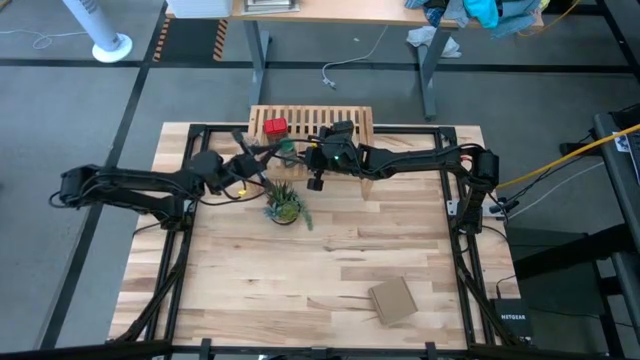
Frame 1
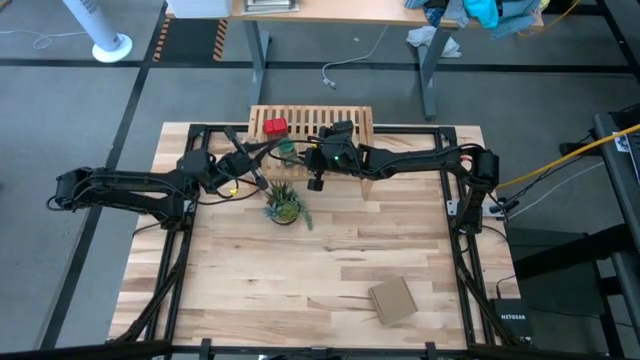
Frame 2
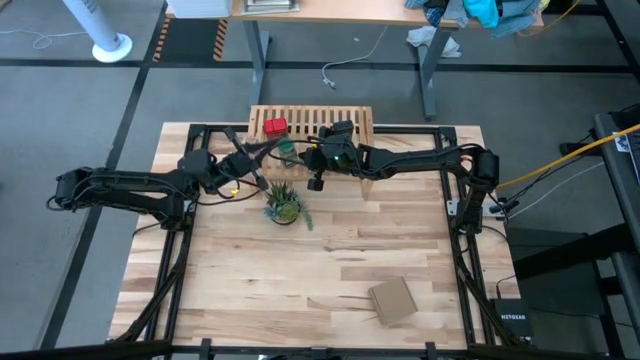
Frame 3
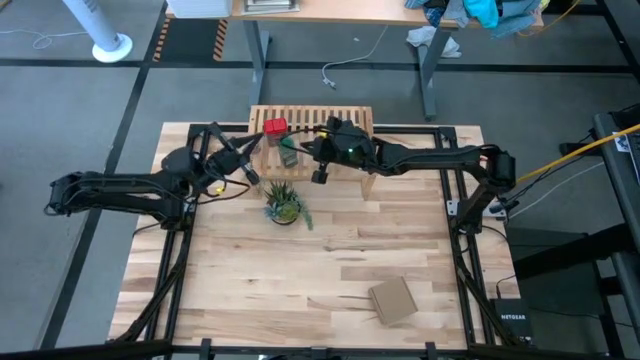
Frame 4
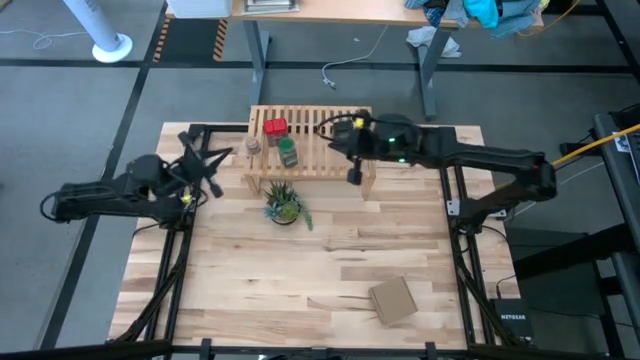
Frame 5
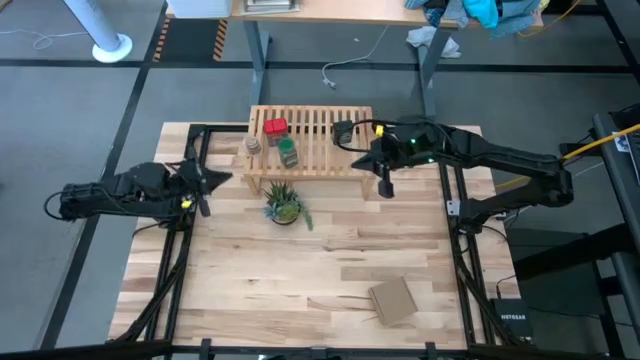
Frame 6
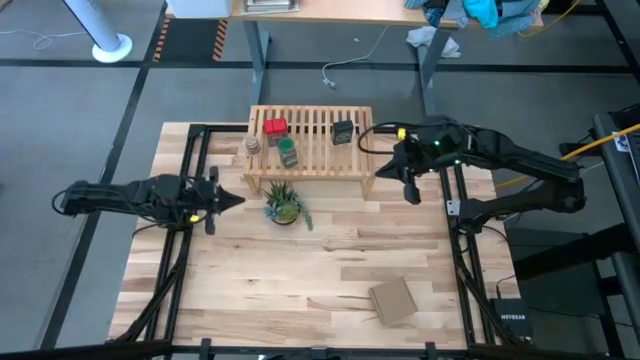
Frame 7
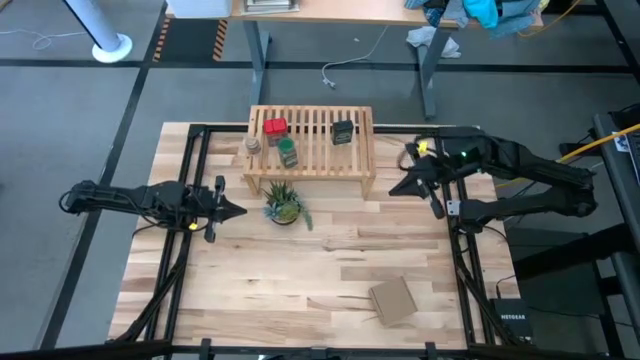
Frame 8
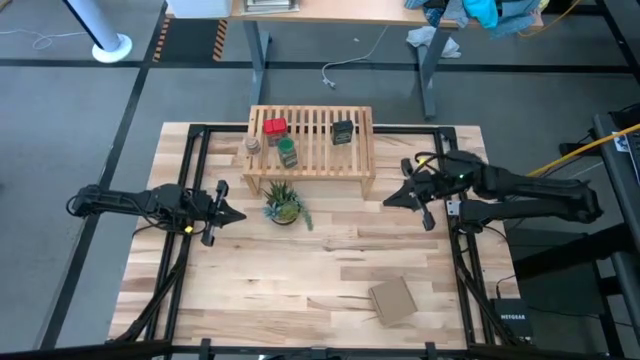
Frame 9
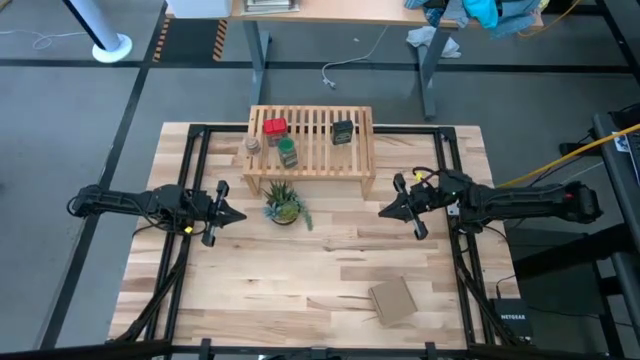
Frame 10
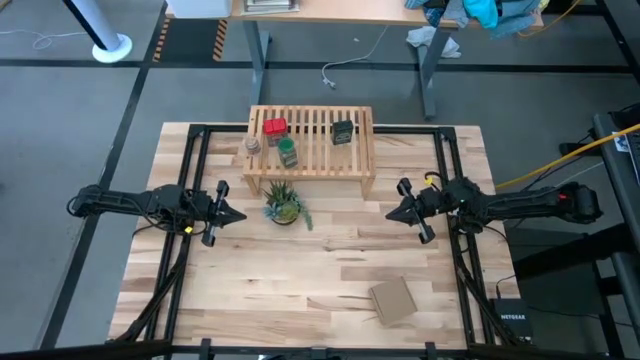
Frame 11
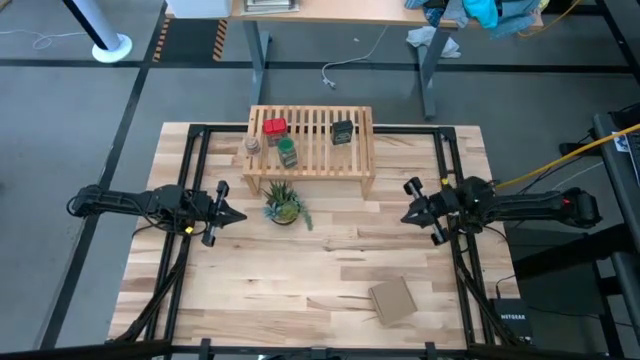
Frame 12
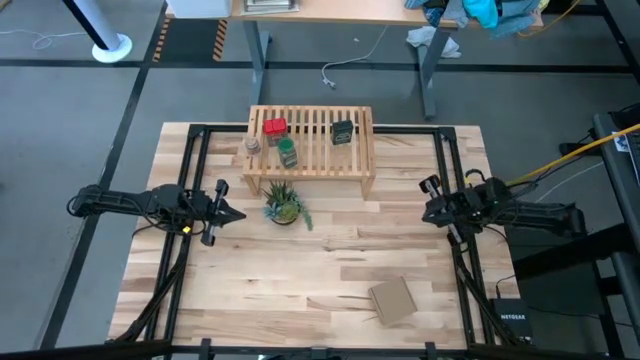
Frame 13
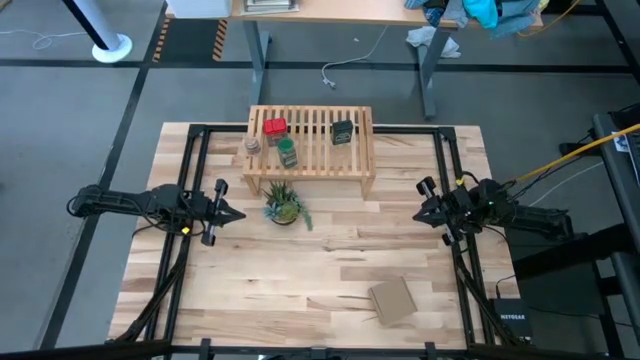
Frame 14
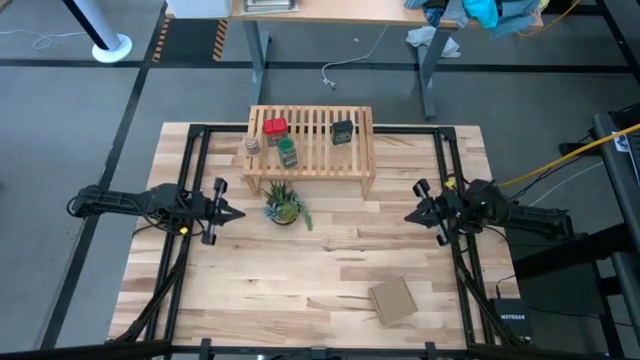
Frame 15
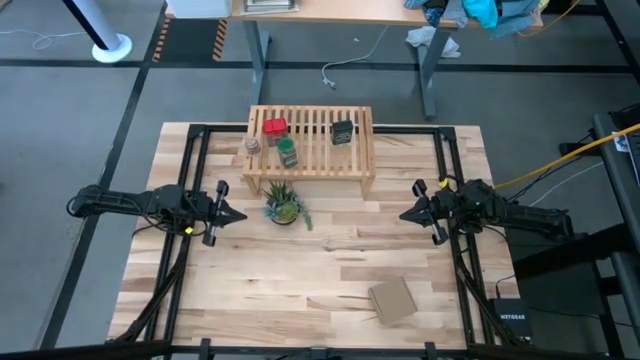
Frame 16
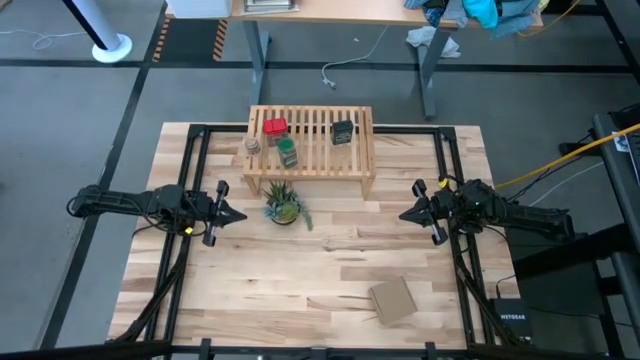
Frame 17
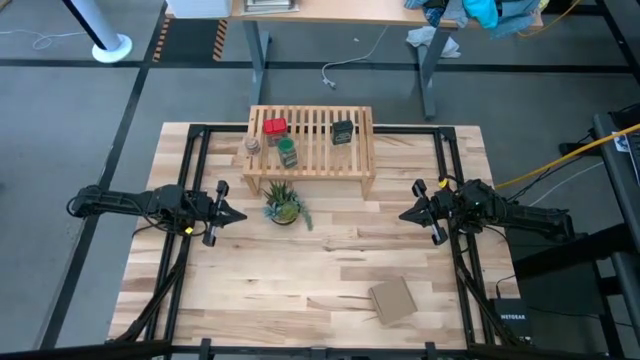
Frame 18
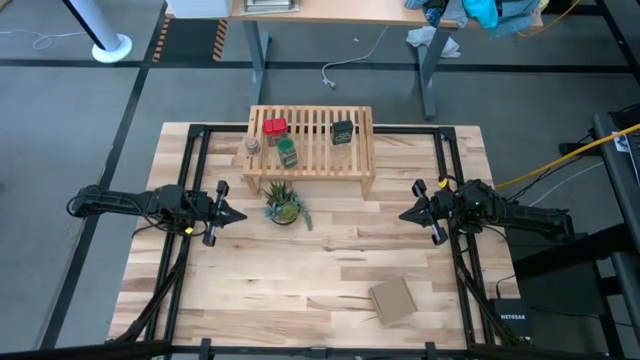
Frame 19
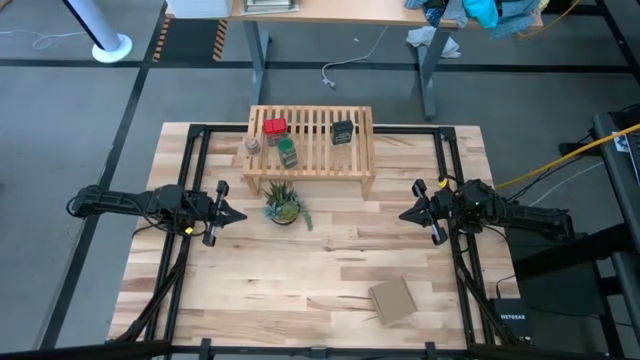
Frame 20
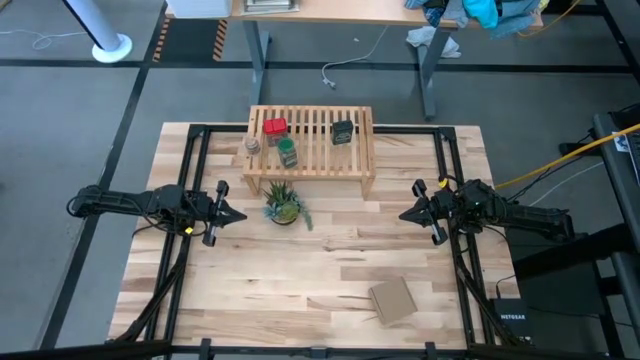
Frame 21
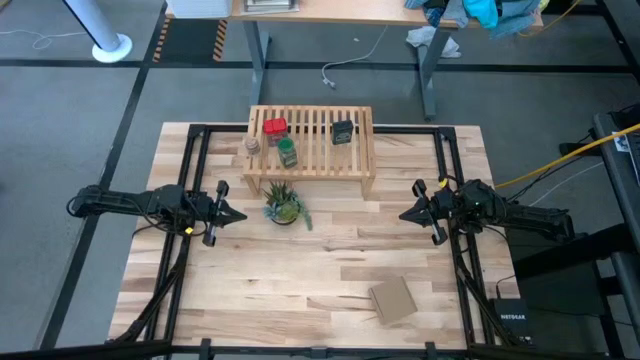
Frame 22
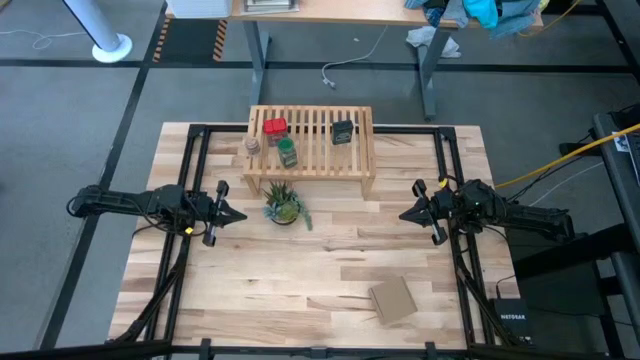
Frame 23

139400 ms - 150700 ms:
Task: Shelf spices
Return to Home Position

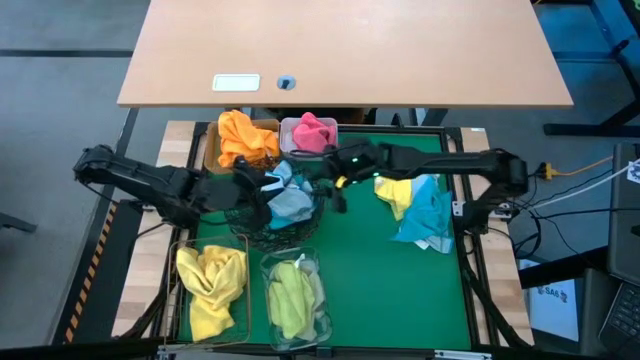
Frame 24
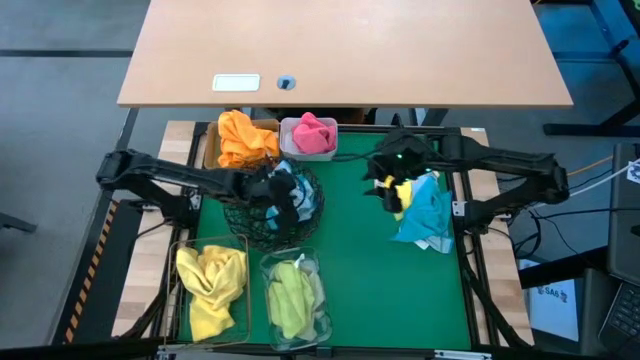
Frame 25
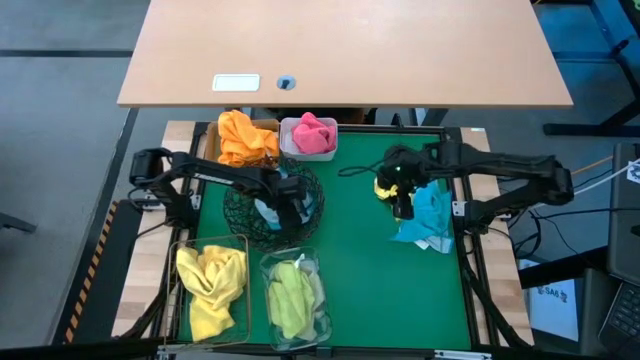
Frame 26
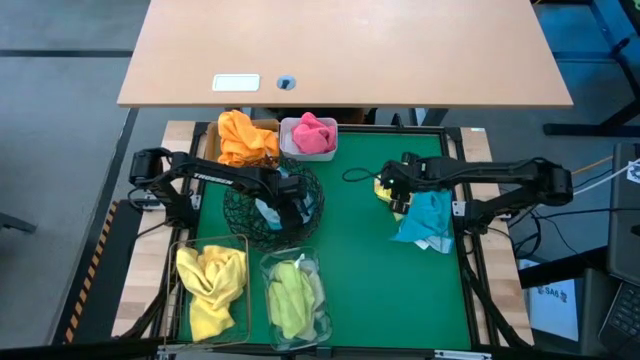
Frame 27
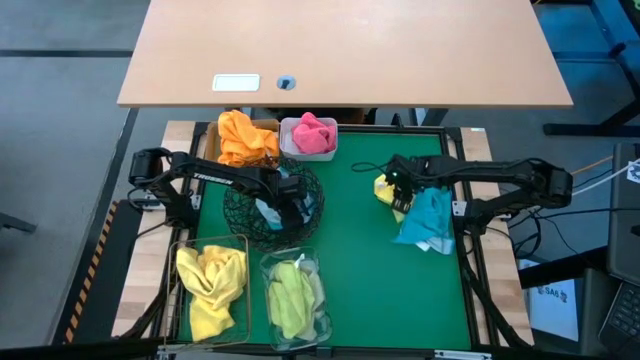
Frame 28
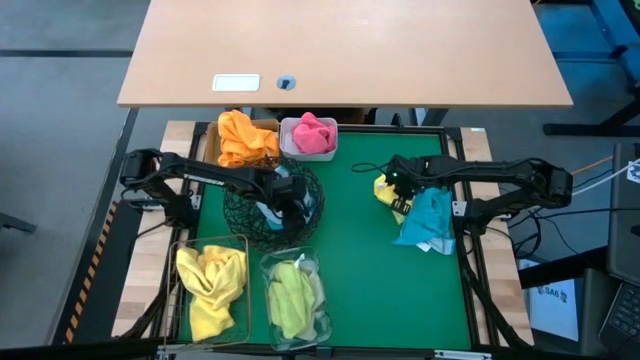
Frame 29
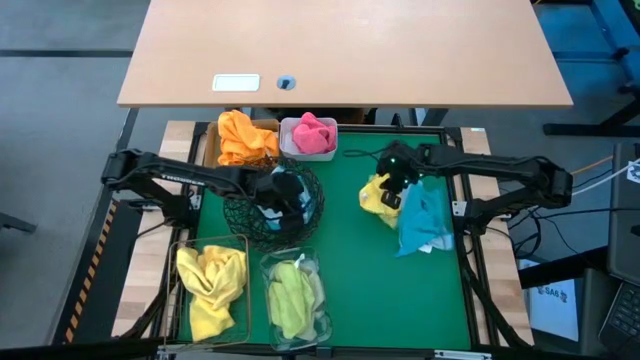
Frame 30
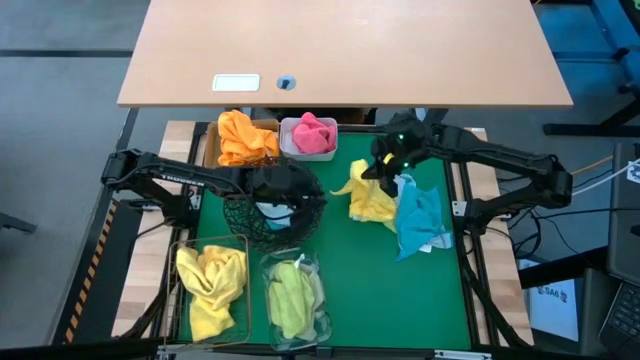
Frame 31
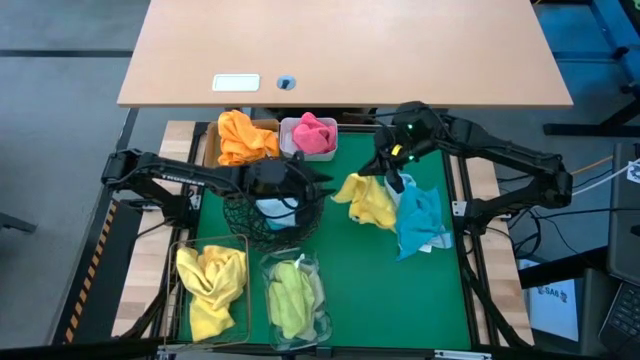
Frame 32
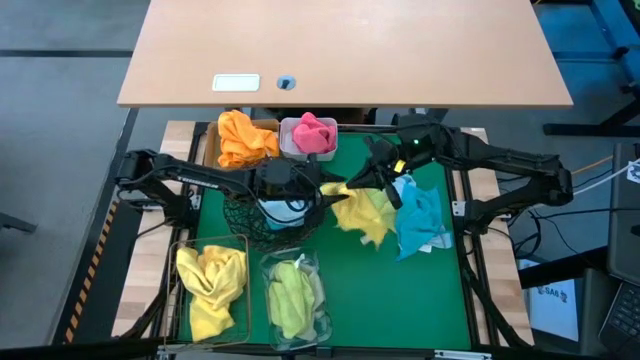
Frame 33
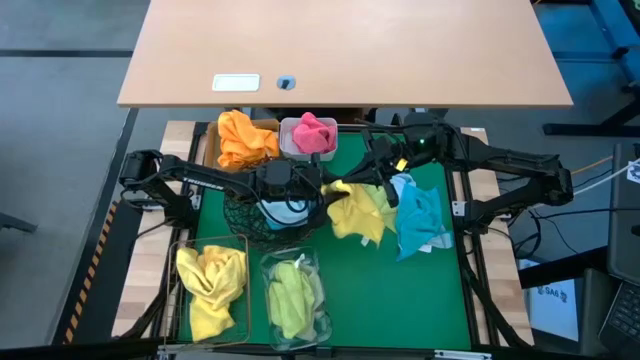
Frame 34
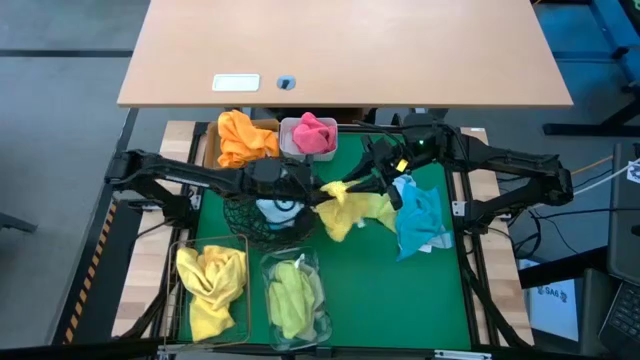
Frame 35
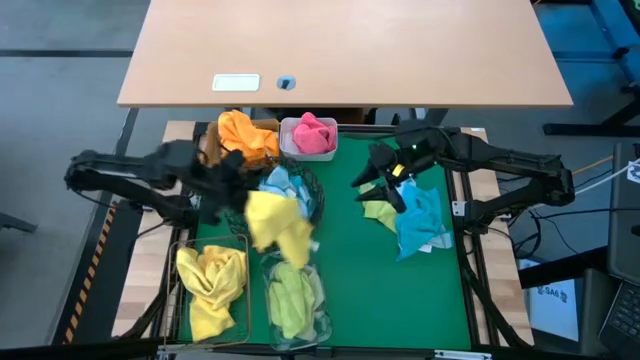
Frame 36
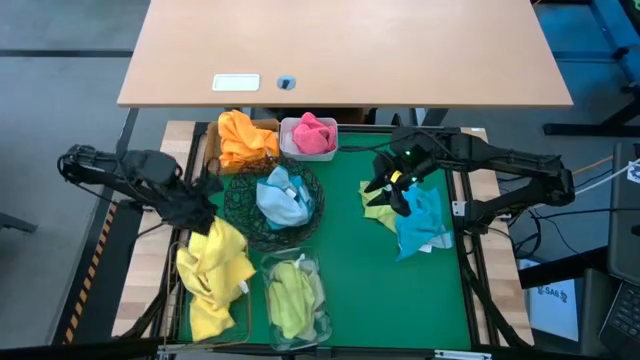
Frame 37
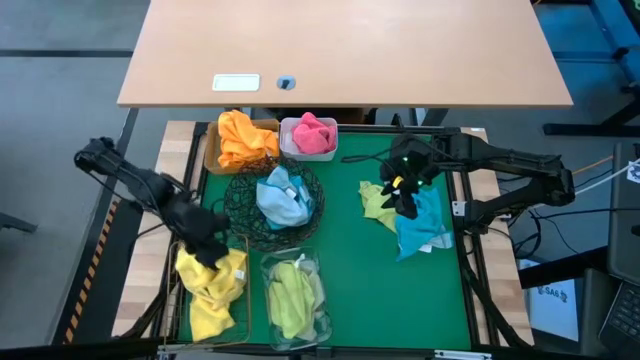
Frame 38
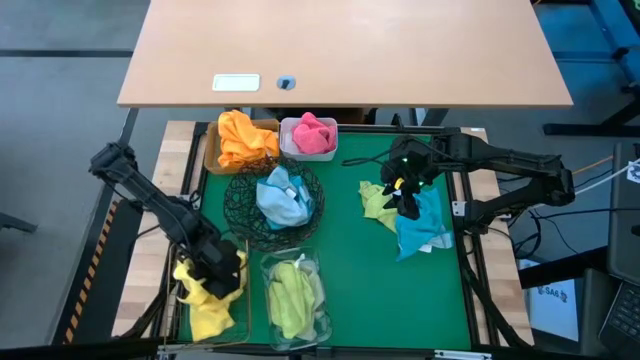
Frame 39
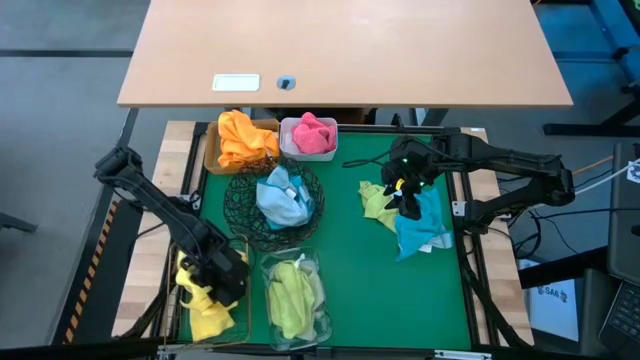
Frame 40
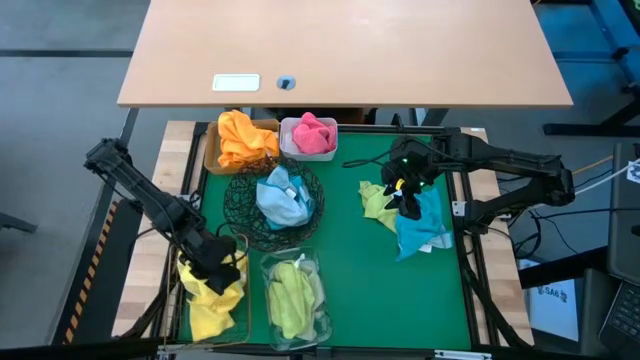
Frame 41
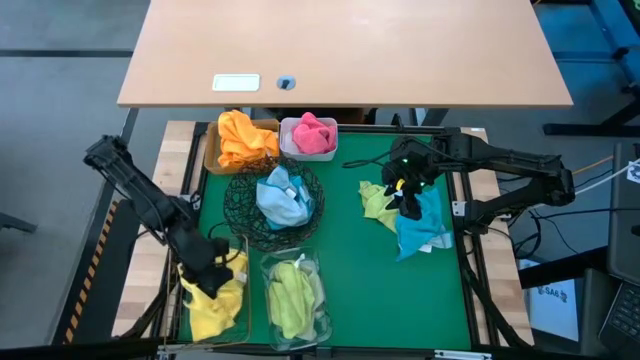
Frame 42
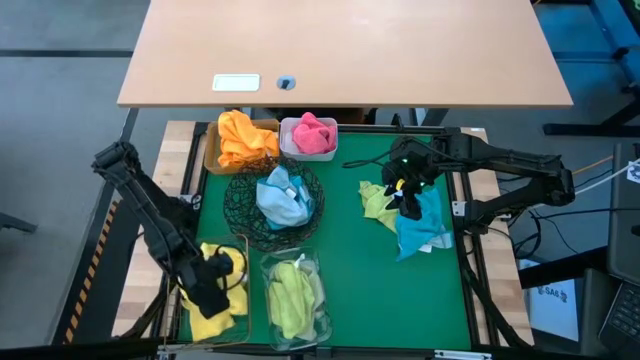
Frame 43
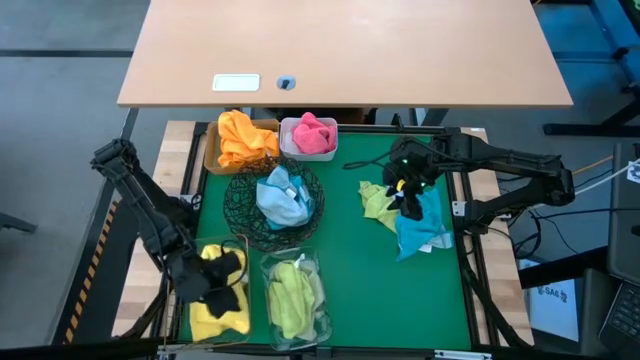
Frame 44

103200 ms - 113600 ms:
Task: Sort microfiber towel by color & place in baskets
Put the yellow microfiber towel into the wire basket
